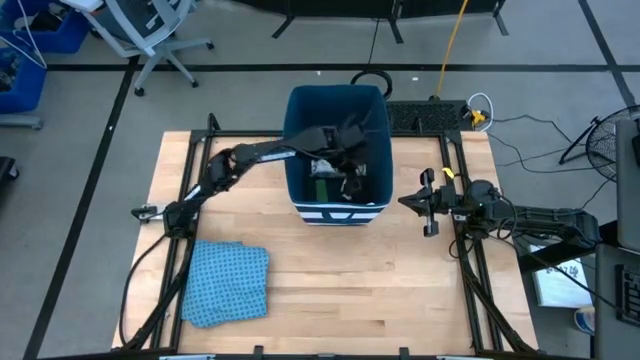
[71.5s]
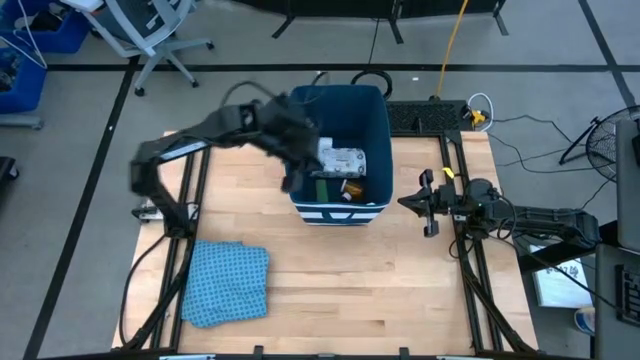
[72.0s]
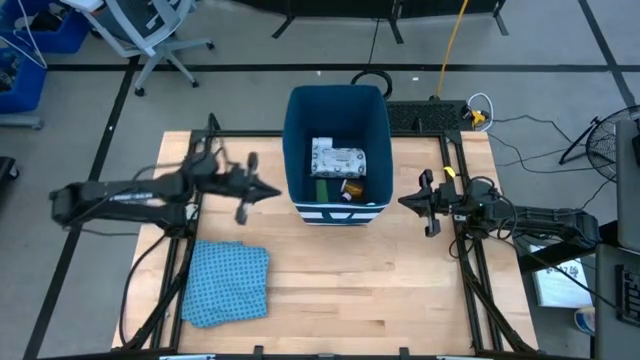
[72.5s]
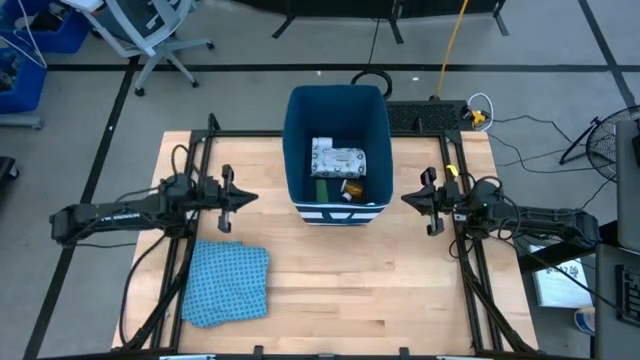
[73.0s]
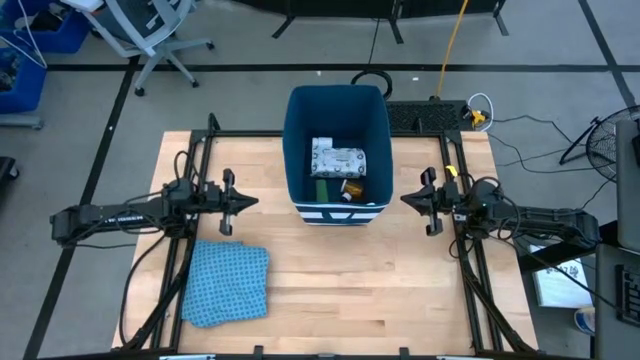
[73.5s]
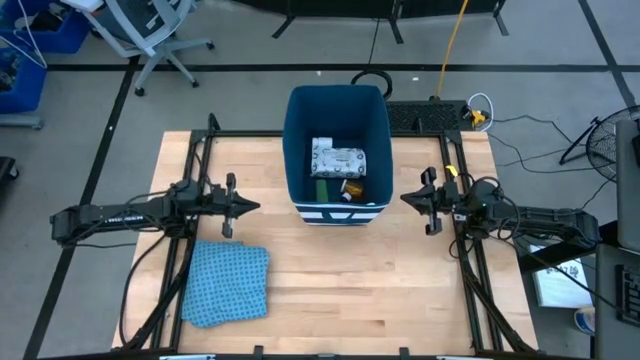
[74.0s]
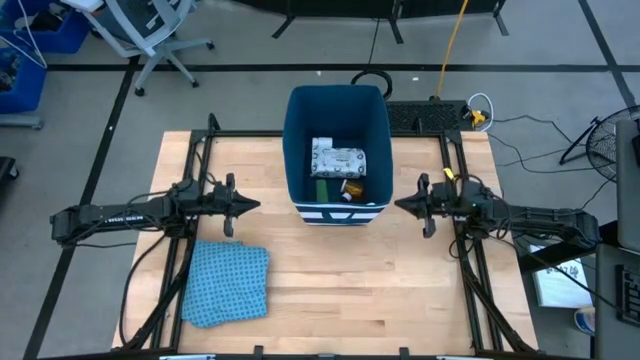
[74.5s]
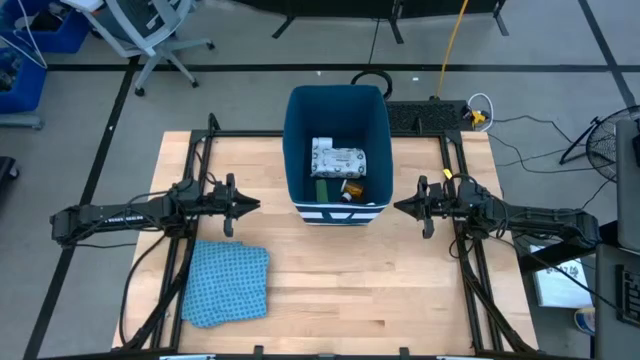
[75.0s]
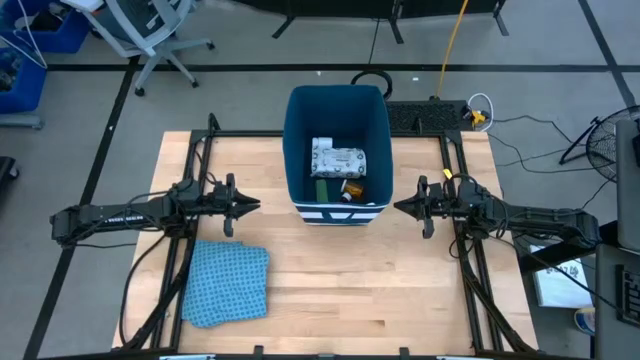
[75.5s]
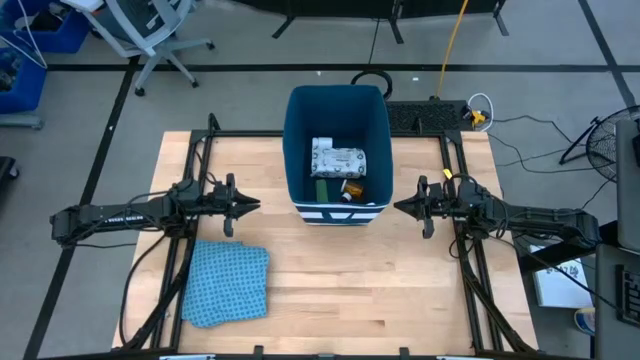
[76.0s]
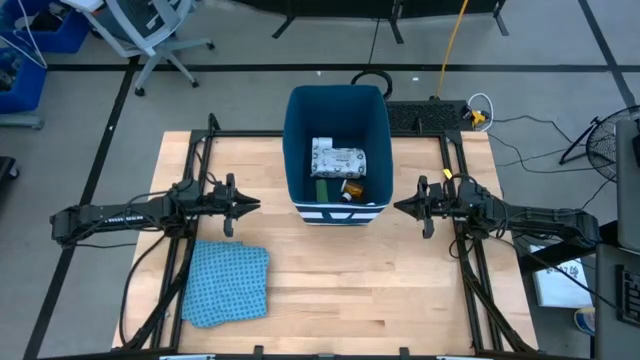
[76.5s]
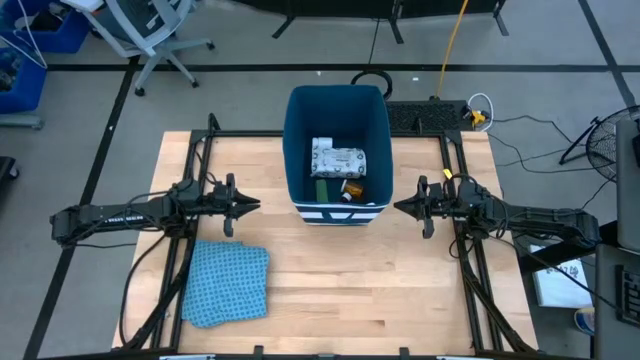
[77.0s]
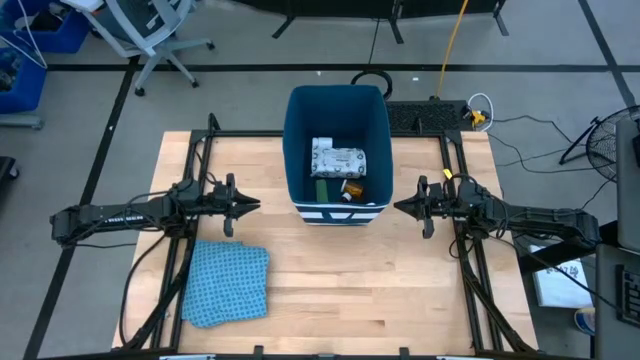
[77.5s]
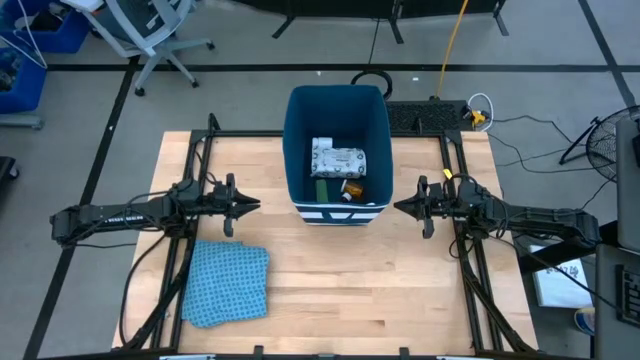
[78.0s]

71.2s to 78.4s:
Task: Pick & place medical supplies in basket/bin
Return to Home Position

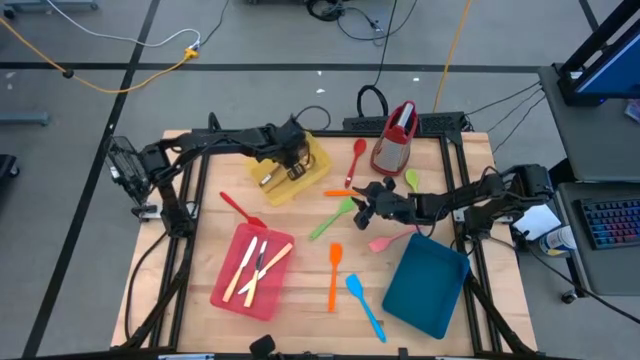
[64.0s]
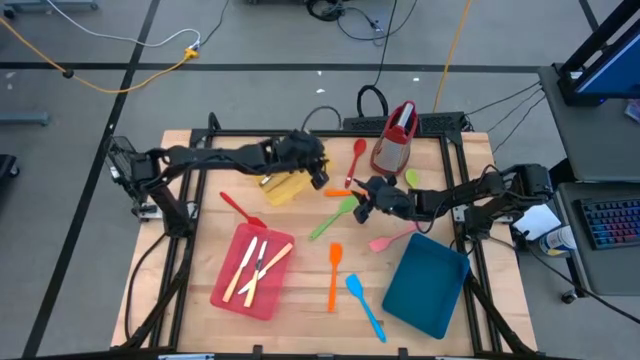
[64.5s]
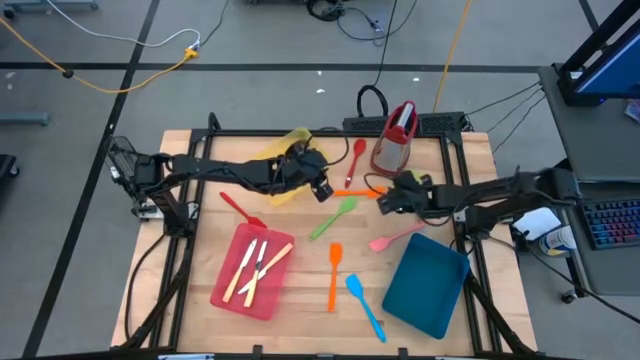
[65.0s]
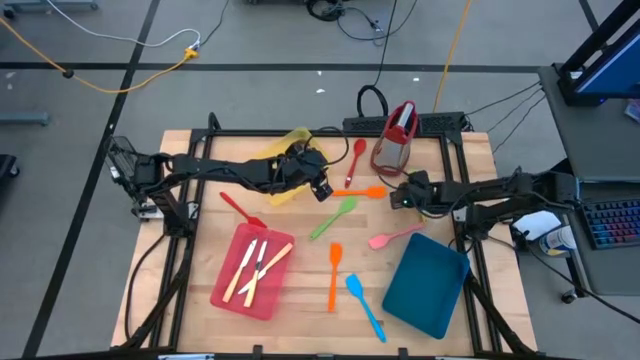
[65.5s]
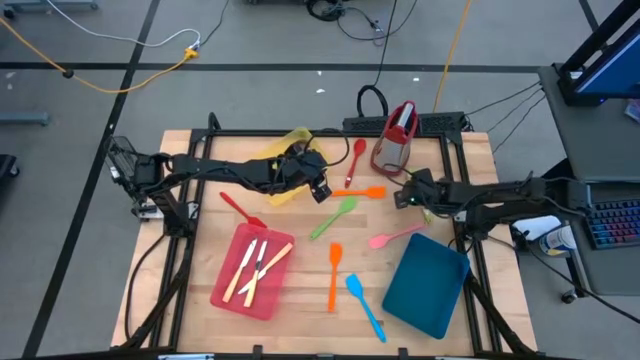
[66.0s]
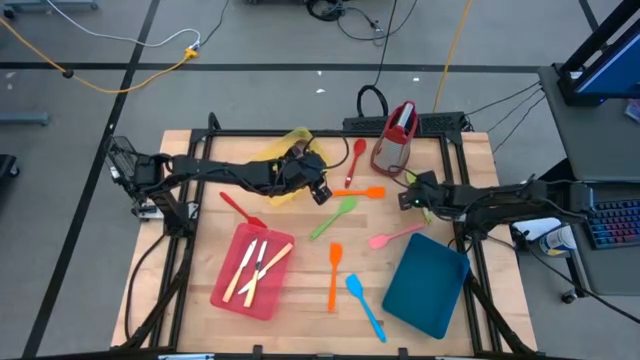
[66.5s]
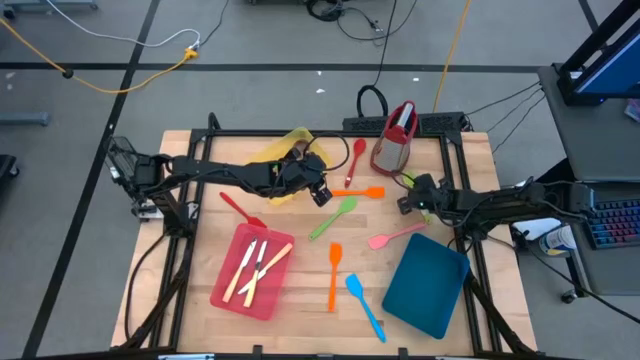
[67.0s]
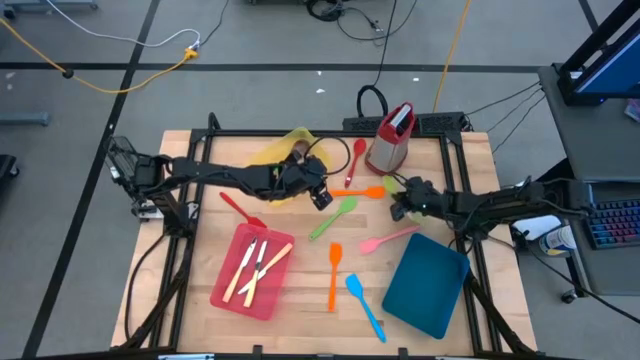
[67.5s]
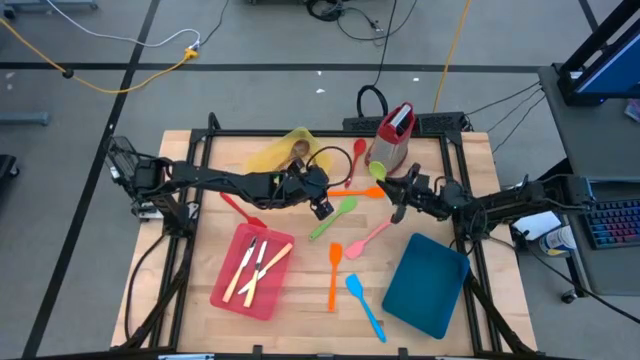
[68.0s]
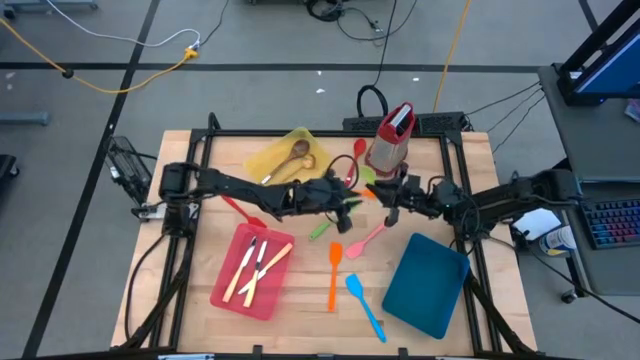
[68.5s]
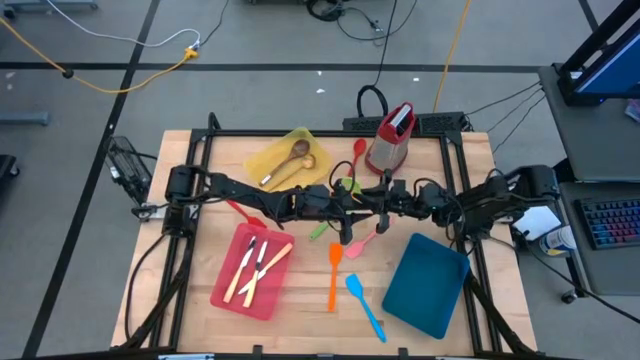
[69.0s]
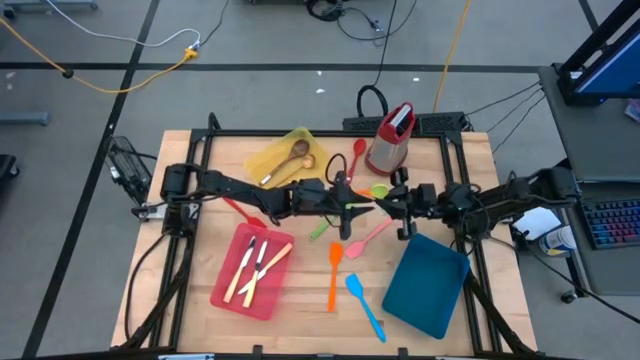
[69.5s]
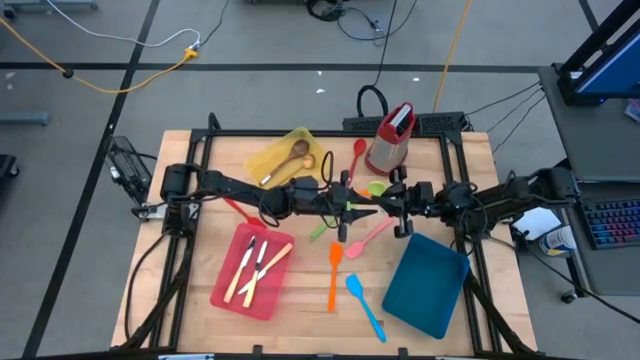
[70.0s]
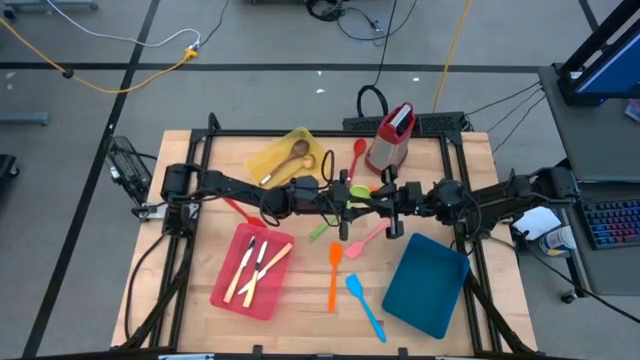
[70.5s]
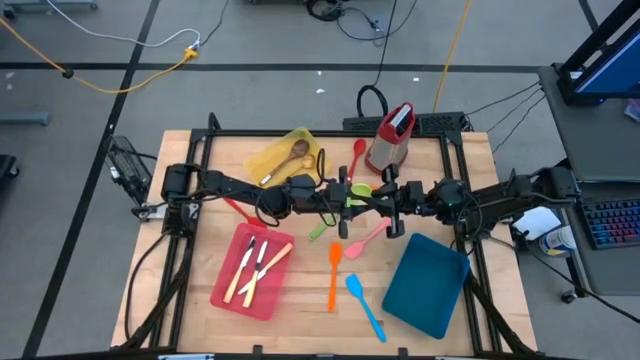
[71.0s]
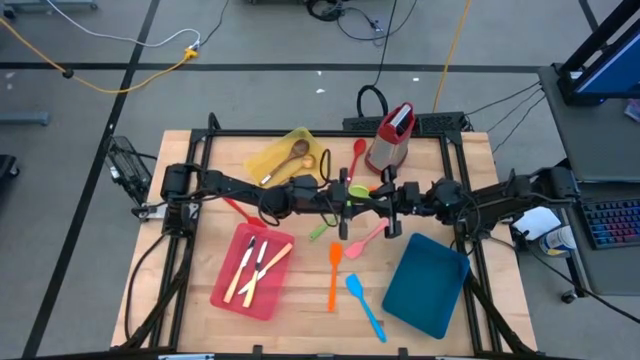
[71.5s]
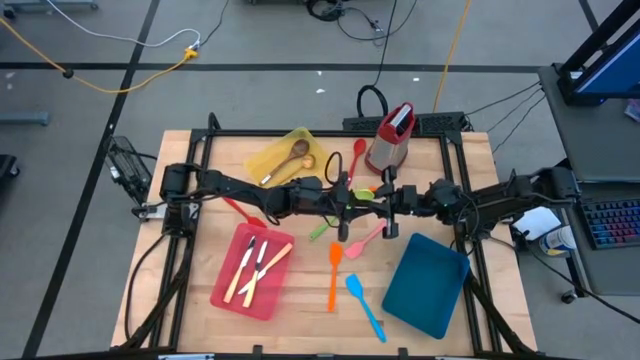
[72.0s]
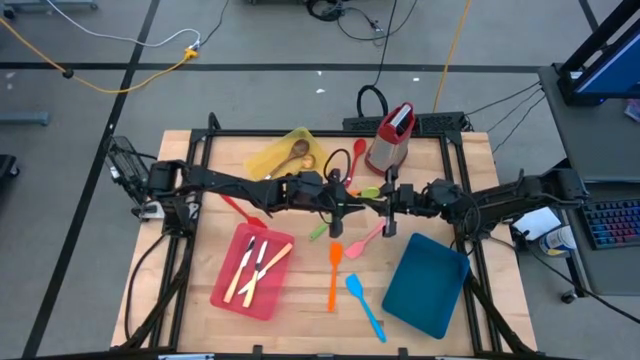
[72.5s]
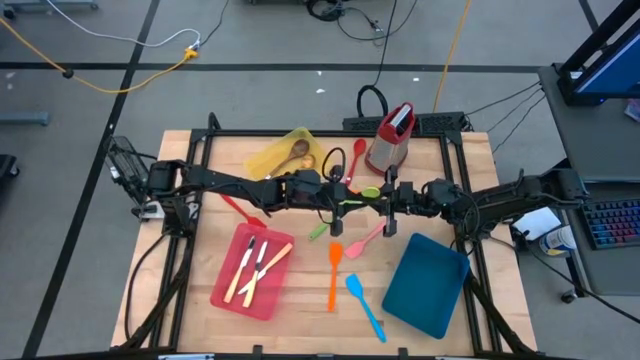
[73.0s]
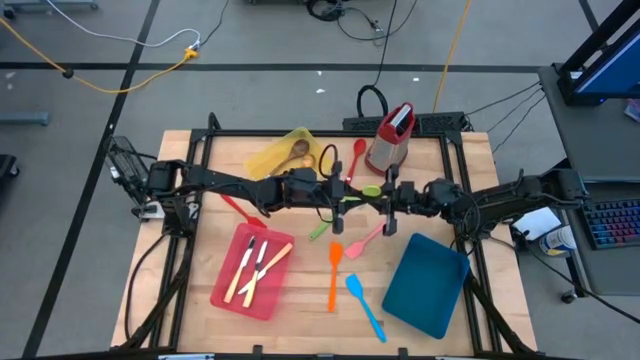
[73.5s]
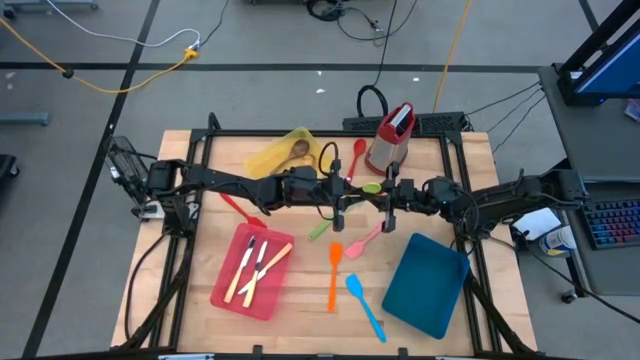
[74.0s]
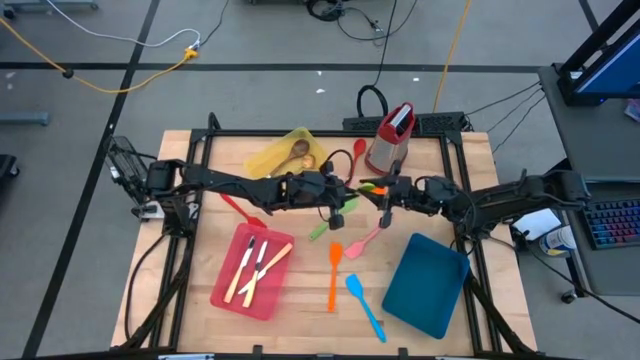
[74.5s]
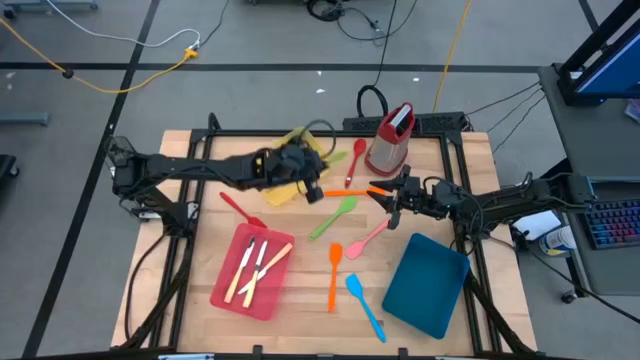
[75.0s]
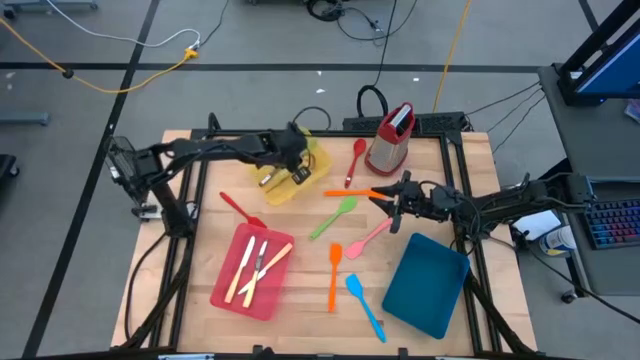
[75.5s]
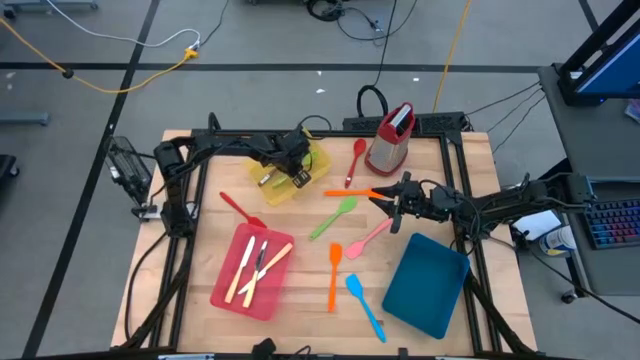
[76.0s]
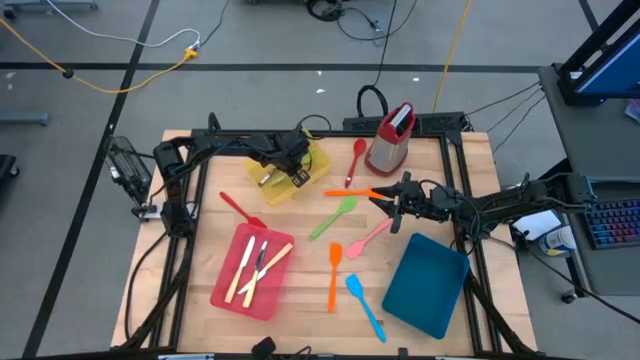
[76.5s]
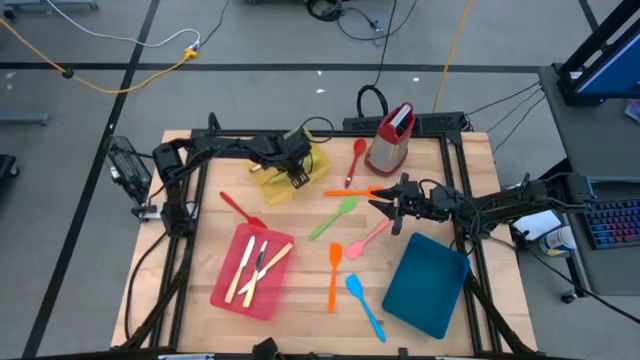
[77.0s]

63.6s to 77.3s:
Task: Pick & Place Kitchen Items
Put the green serving spoon into the yellow bin
